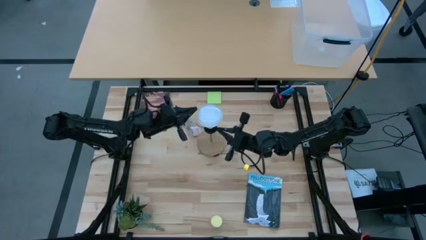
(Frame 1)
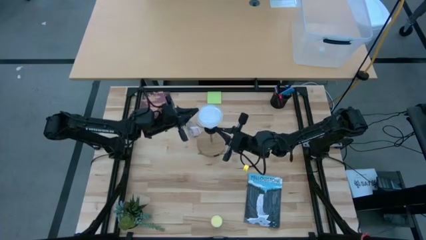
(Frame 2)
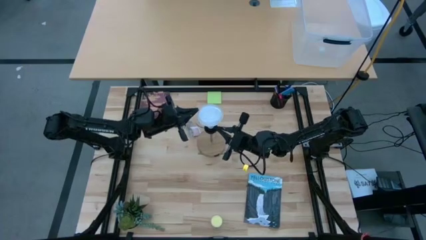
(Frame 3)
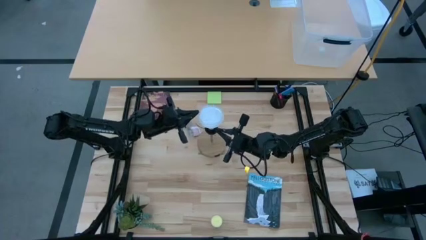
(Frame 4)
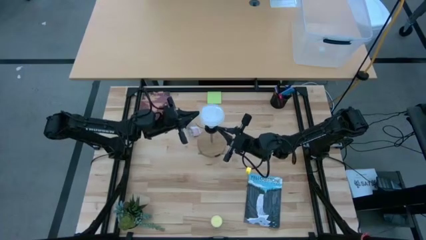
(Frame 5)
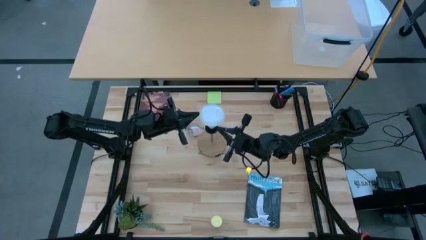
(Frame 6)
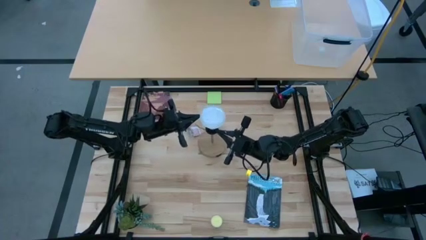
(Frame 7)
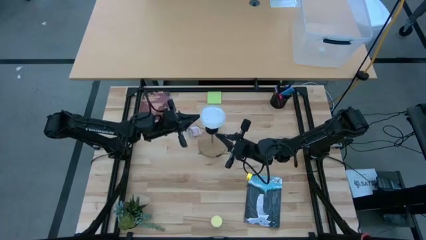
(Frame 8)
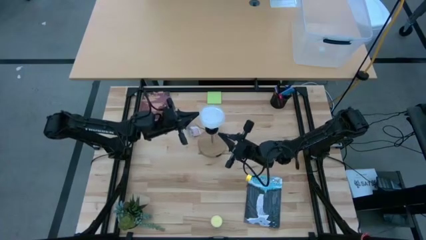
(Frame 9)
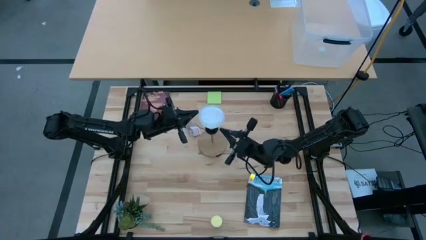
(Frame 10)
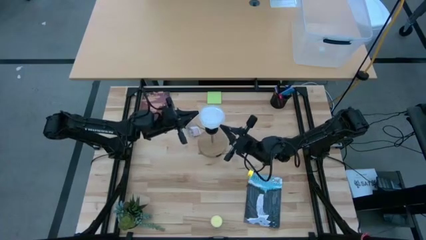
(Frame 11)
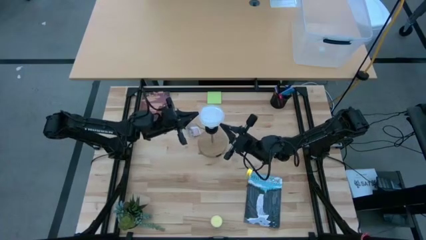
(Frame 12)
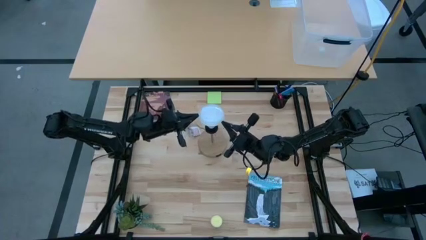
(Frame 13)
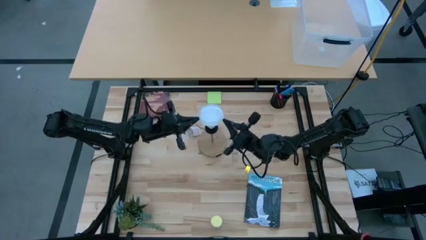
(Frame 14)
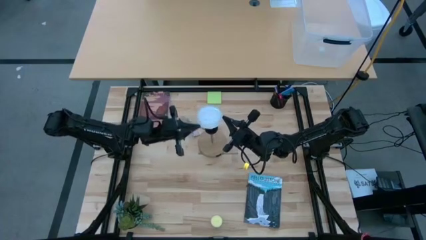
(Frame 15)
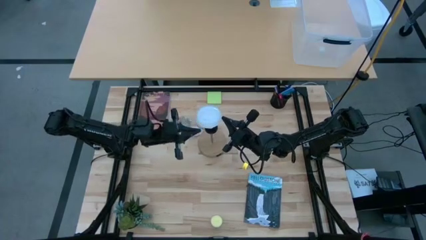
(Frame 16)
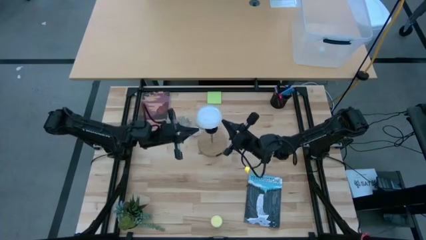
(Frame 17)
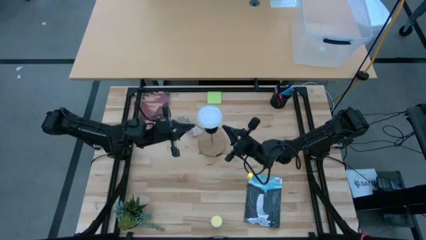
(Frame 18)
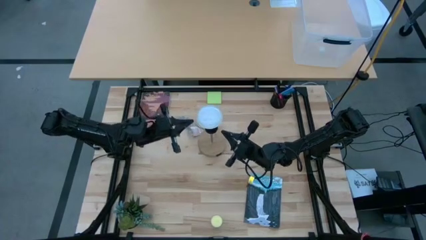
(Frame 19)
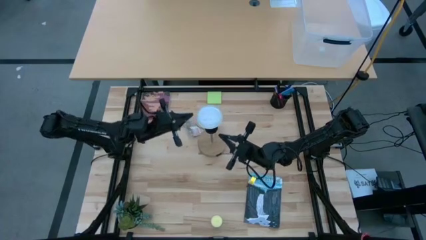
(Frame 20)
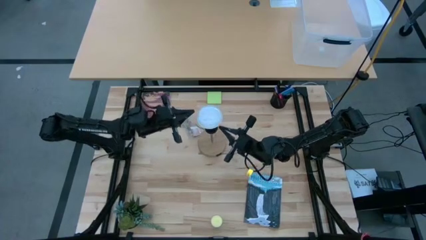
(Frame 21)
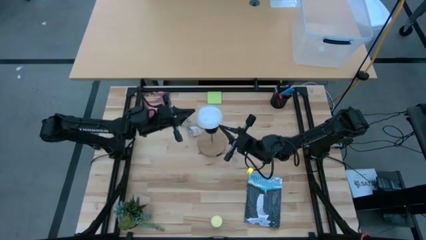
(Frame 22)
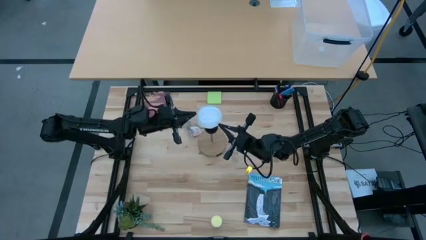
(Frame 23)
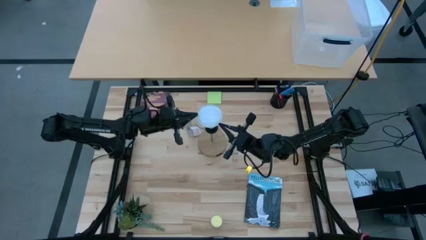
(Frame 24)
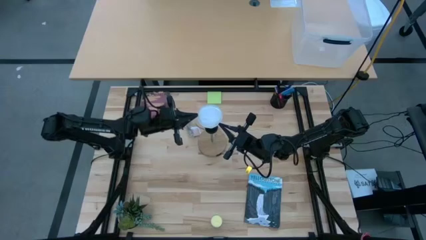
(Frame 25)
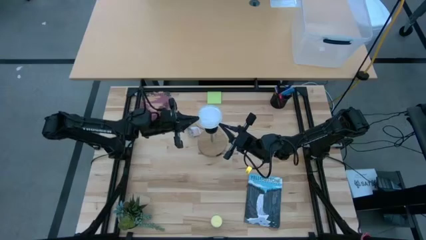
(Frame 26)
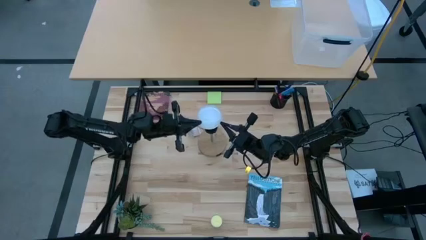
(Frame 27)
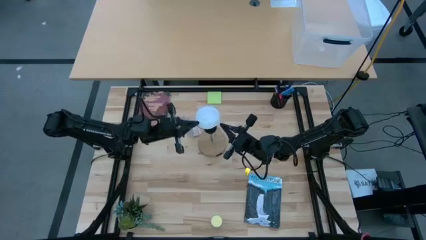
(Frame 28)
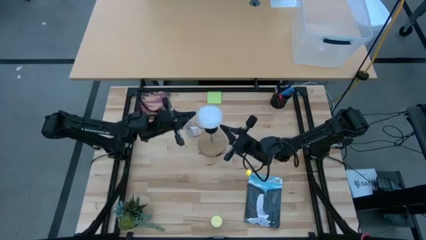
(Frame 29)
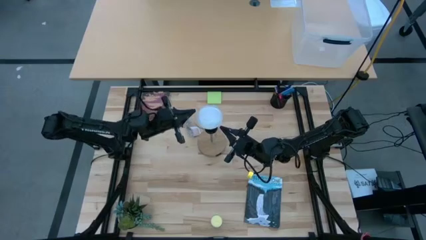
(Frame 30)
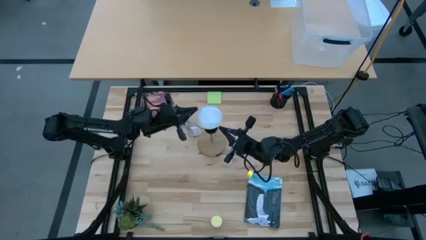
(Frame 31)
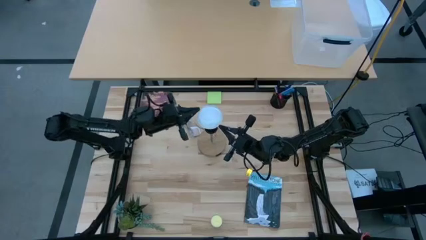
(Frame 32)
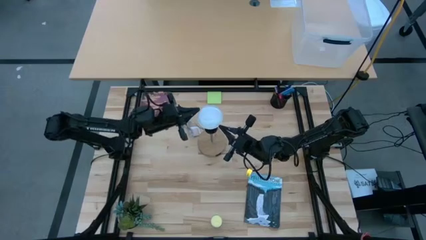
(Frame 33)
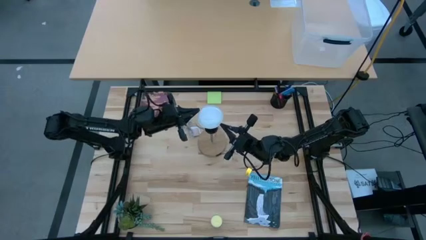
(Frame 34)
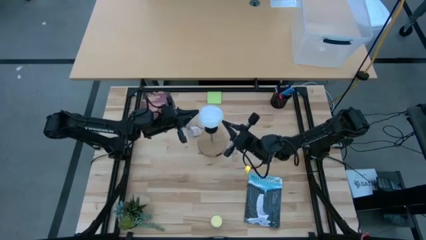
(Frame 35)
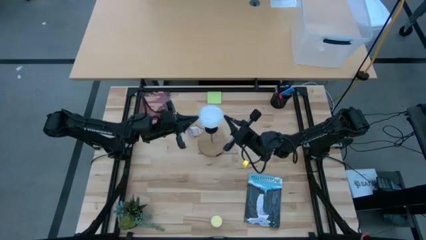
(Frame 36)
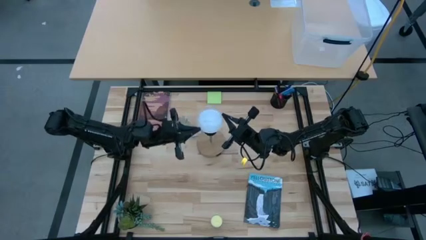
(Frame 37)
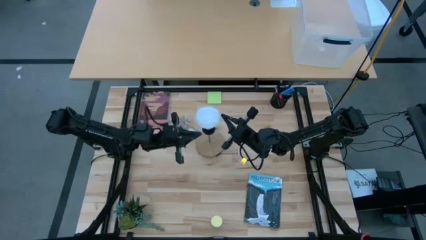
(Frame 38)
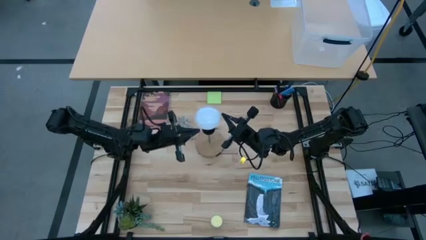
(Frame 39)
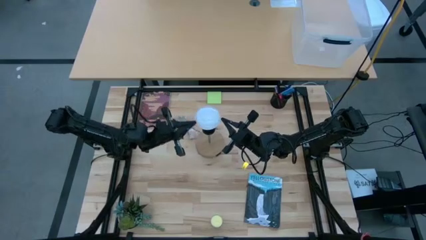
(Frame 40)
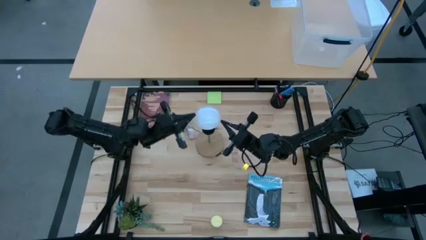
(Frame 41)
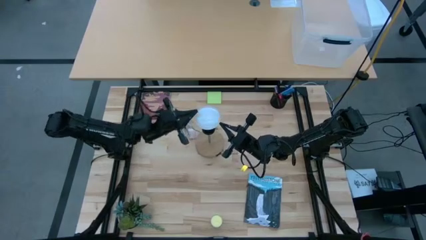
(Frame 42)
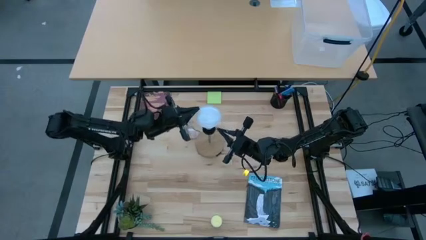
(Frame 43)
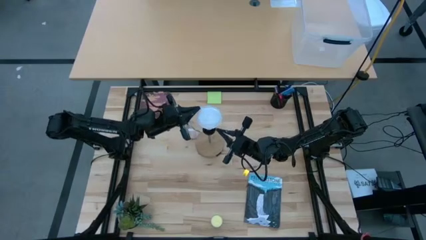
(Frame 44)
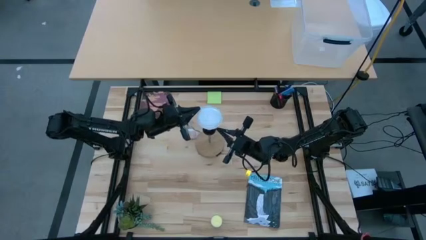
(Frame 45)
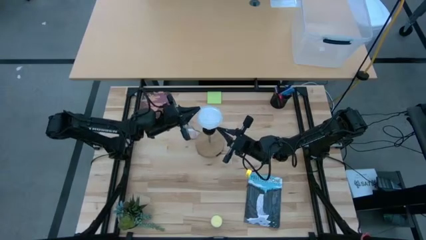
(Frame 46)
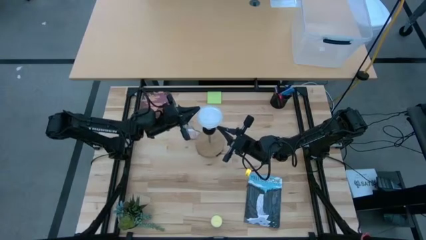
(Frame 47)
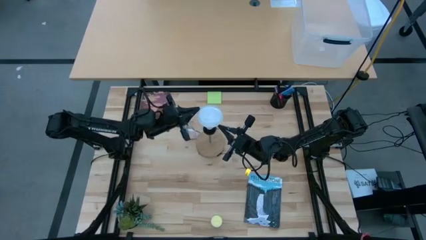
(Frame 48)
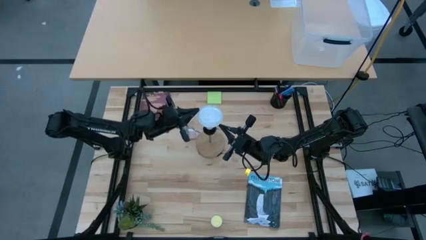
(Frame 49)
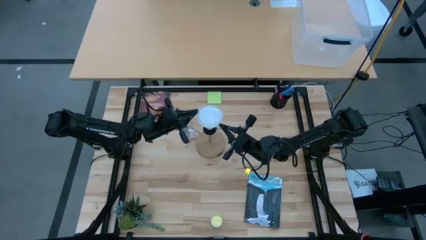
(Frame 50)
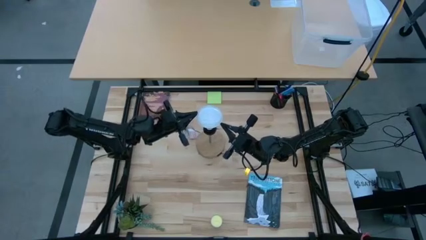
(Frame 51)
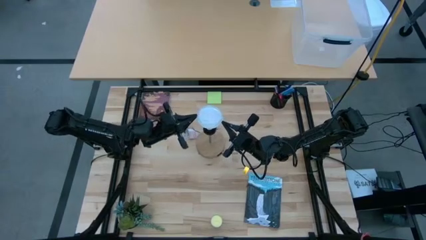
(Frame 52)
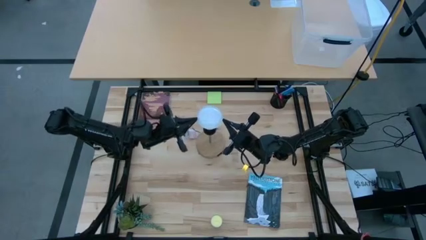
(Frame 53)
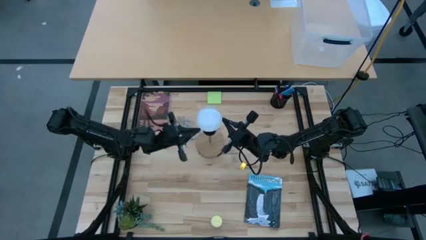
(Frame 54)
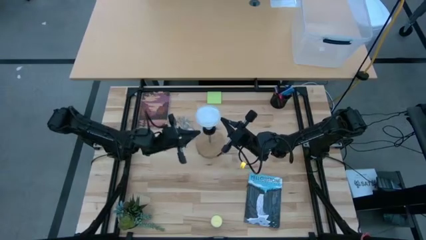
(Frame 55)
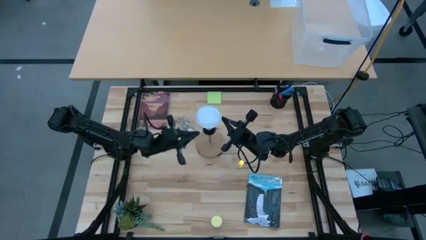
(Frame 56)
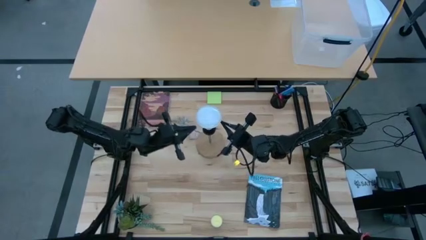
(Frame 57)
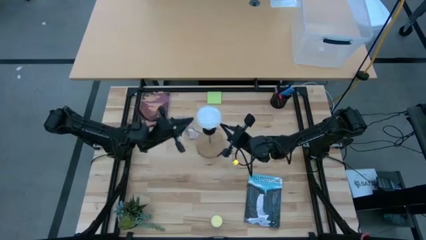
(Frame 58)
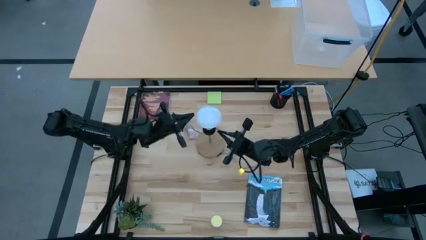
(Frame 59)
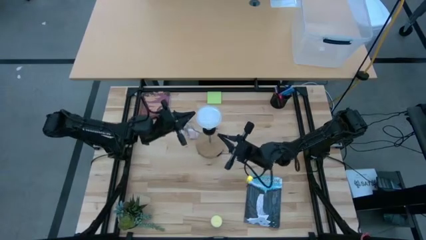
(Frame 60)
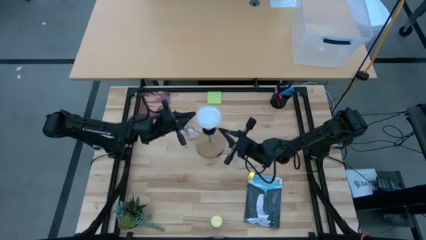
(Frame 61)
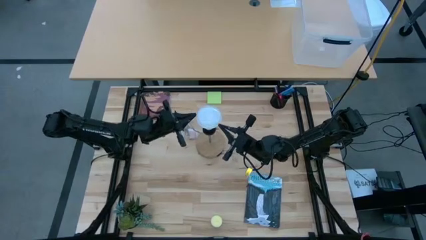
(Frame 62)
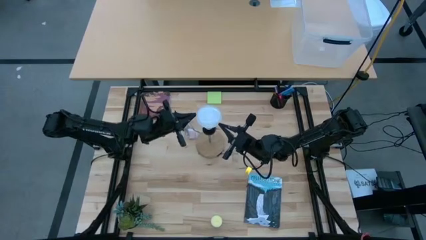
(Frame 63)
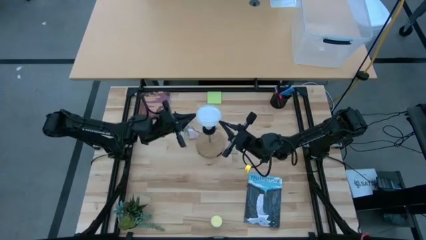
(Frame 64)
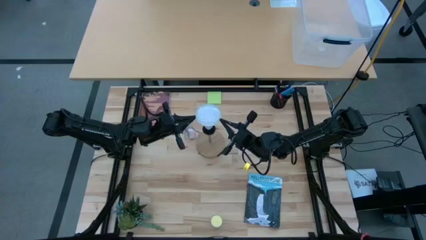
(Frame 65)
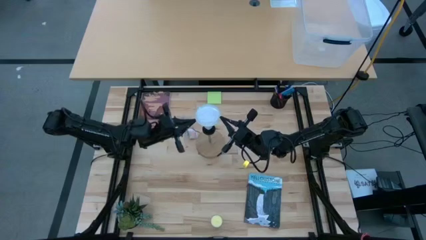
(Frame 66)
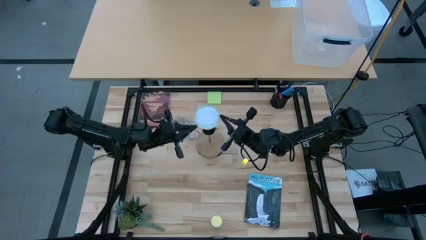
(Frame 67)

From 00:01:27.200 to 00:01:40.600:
Task: Screw lightbulb
Remove the lightbulb from the lamp
